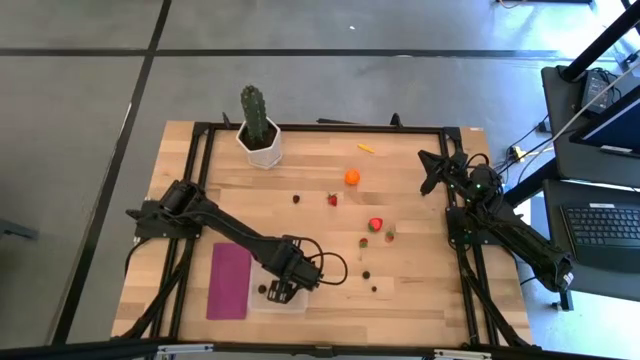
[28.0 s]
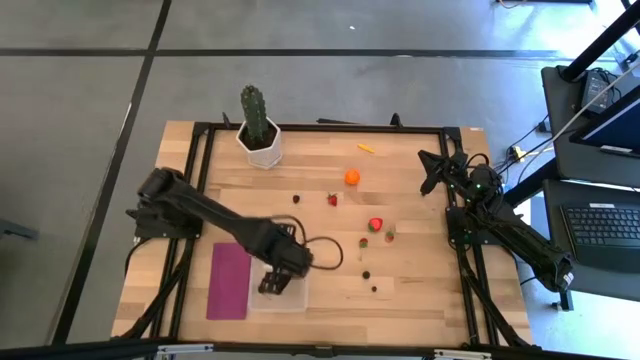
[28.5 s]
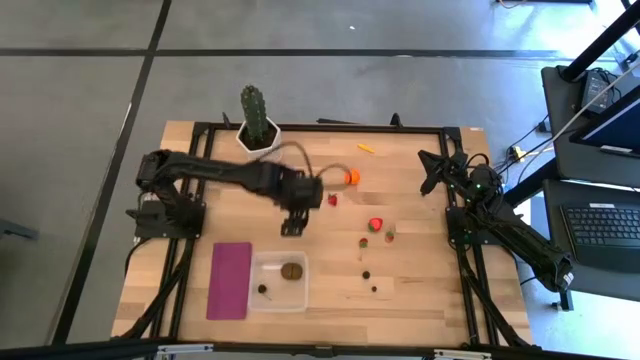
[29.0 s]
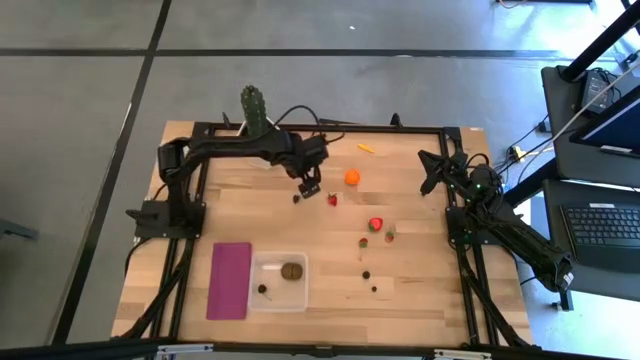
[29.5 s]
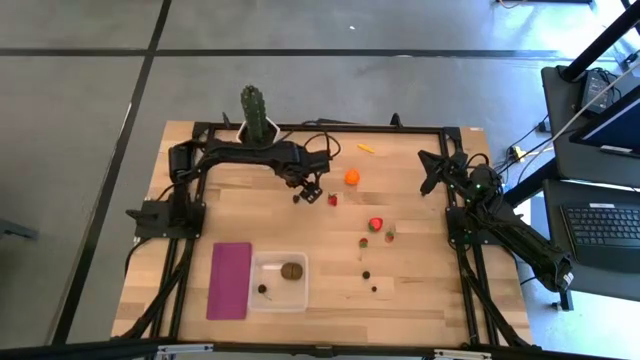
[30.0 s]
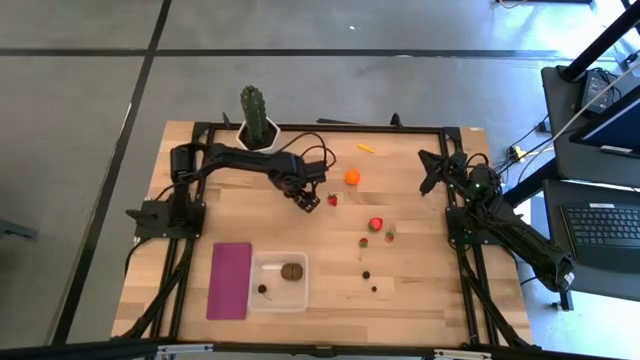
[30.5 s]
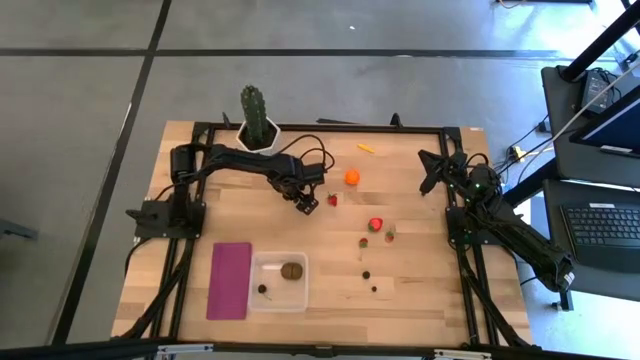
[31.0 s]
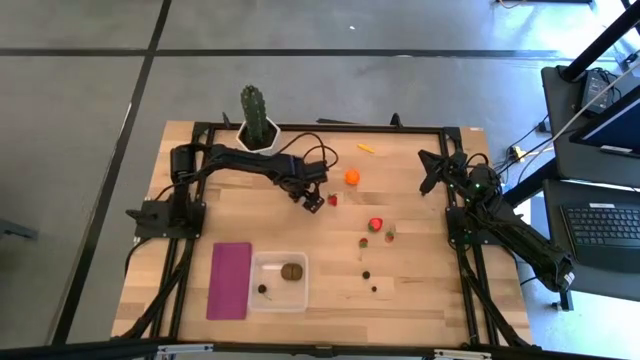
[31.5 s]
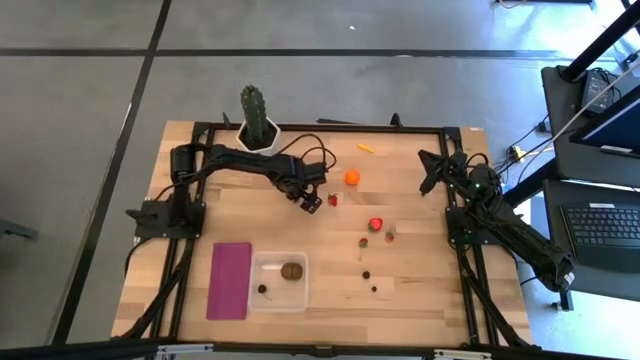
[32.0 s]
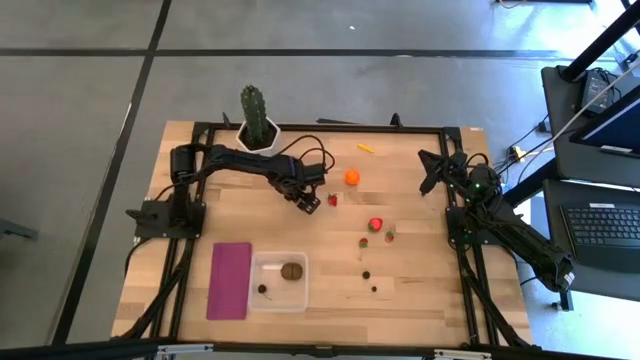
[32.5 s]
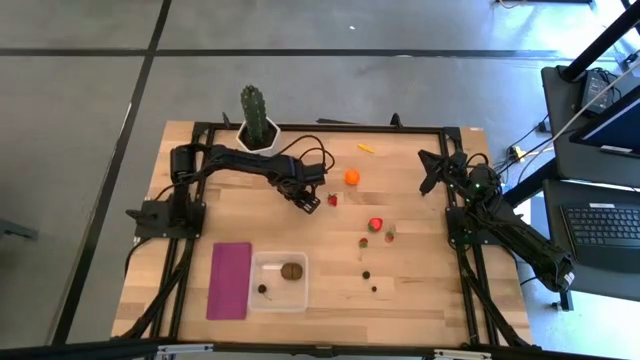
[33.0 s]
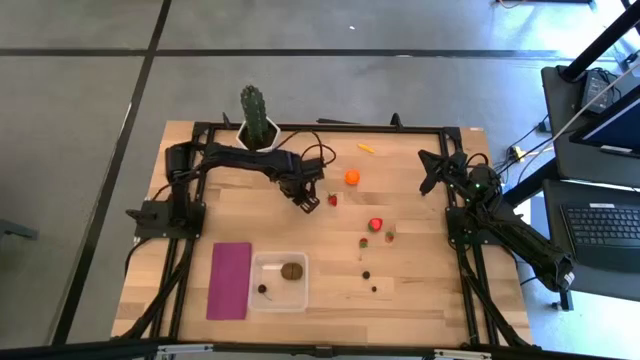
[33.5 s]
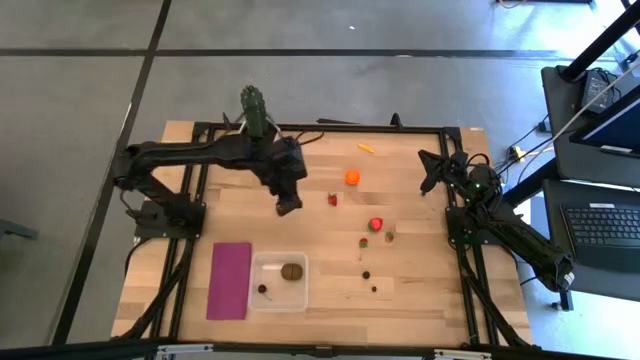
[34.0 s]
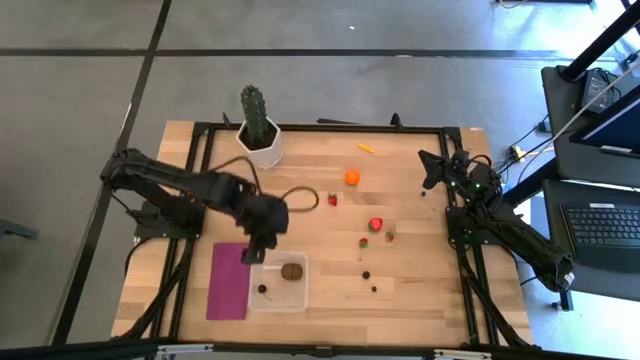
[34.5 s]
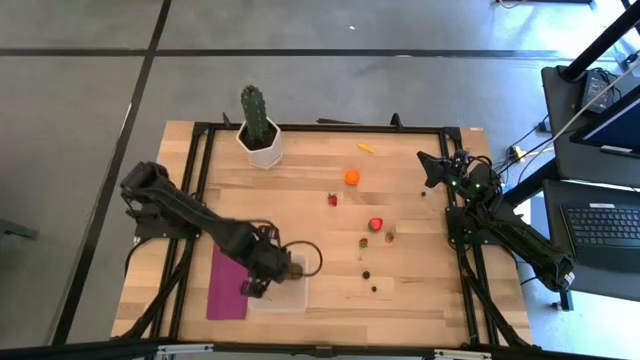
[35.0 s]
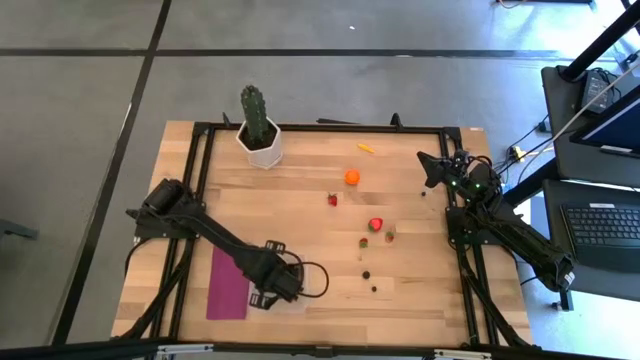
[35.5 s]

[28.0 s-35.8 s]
Task: Pick and placing Produce into tupperware
Put the blackberry into the transparent bin

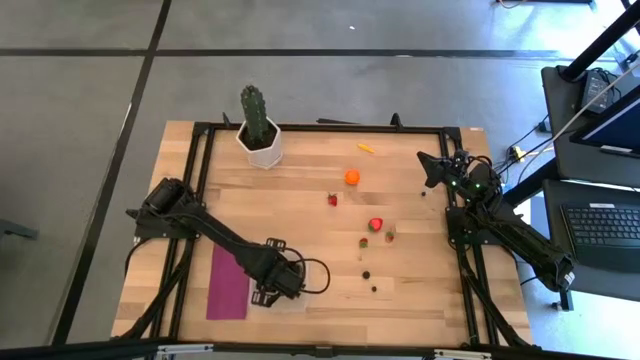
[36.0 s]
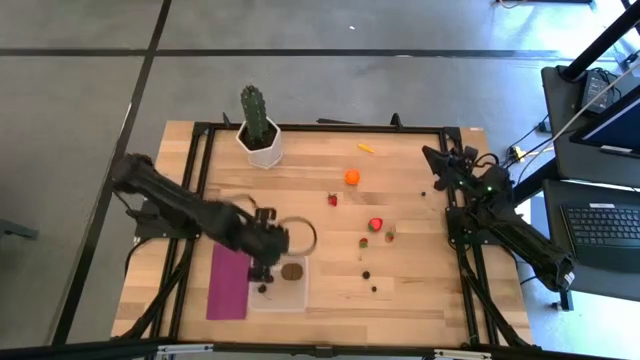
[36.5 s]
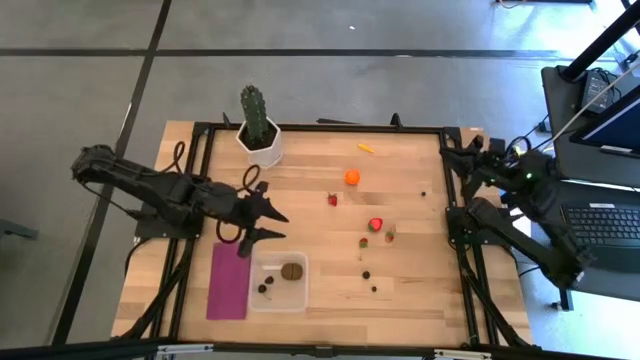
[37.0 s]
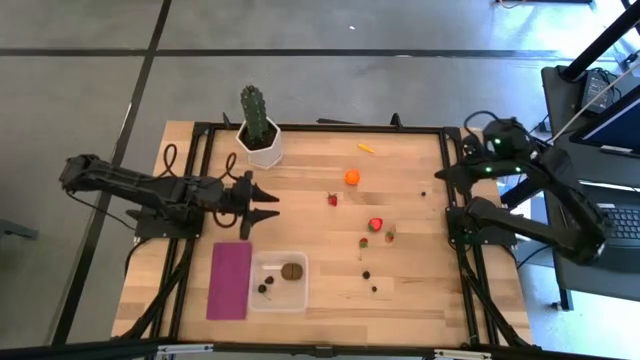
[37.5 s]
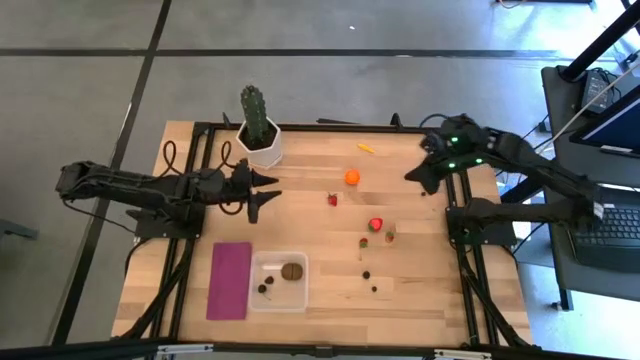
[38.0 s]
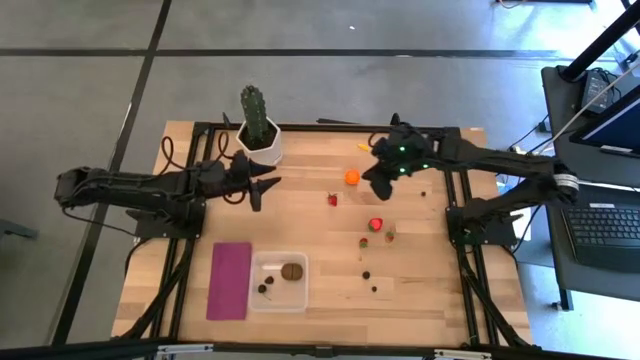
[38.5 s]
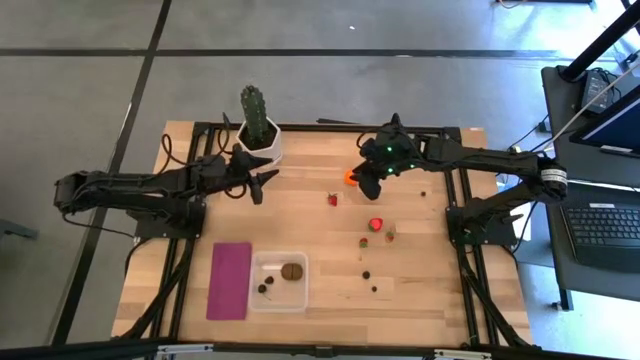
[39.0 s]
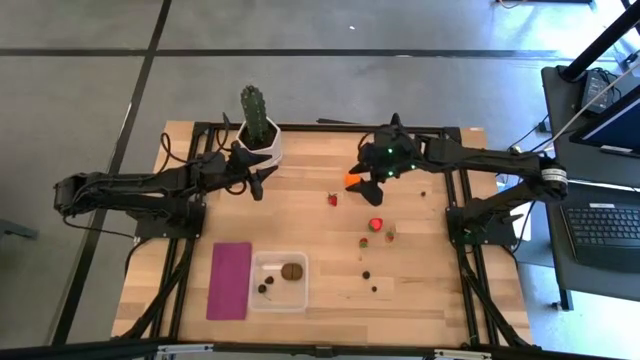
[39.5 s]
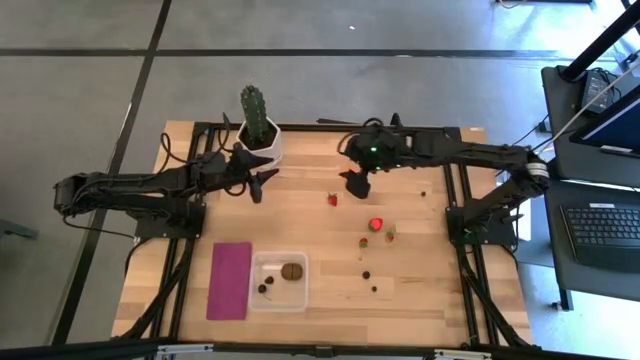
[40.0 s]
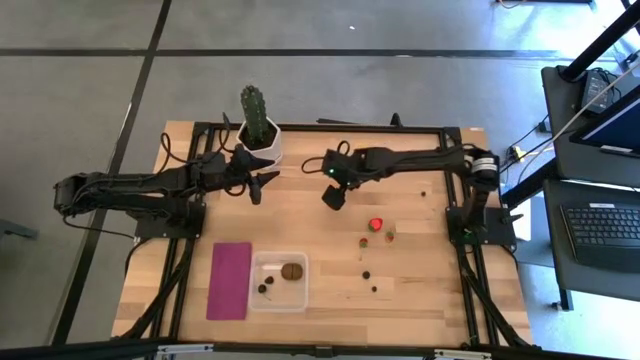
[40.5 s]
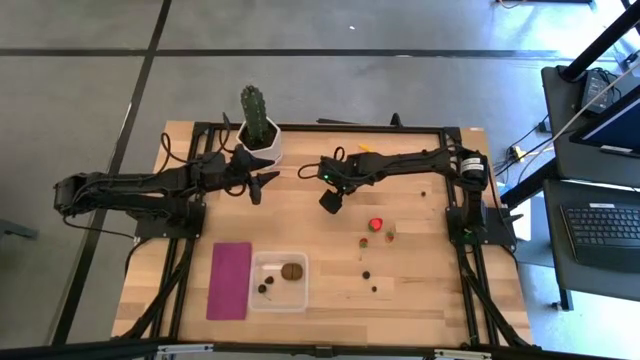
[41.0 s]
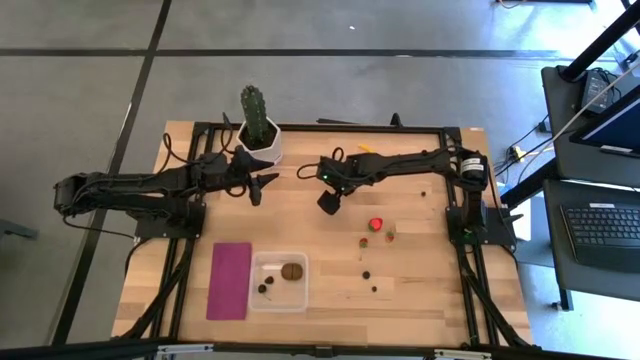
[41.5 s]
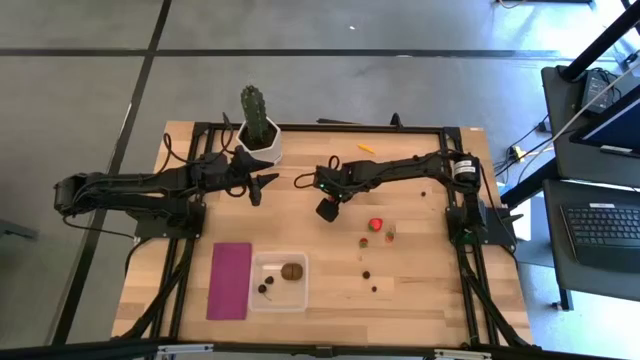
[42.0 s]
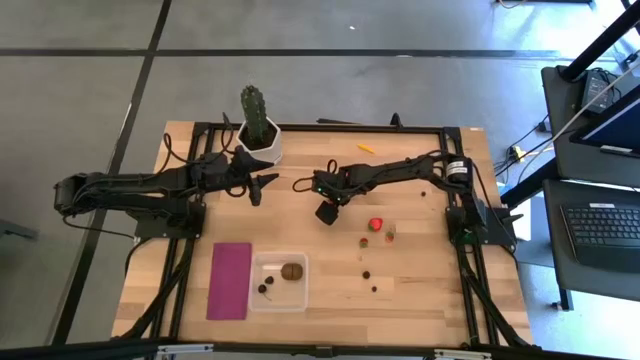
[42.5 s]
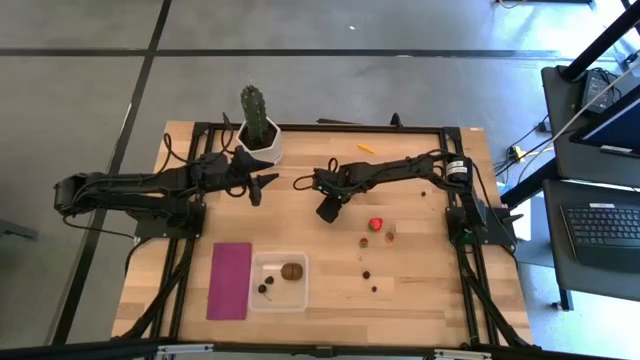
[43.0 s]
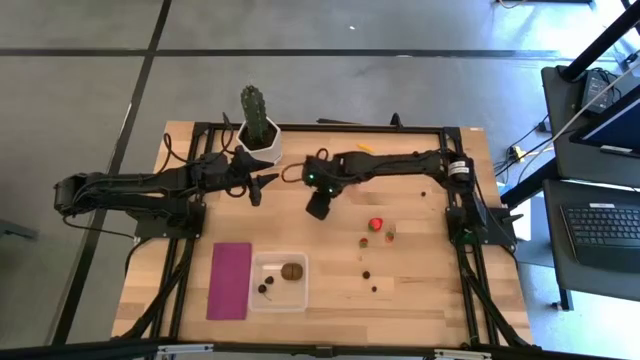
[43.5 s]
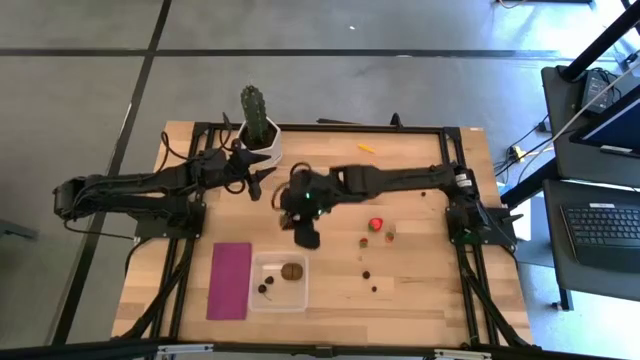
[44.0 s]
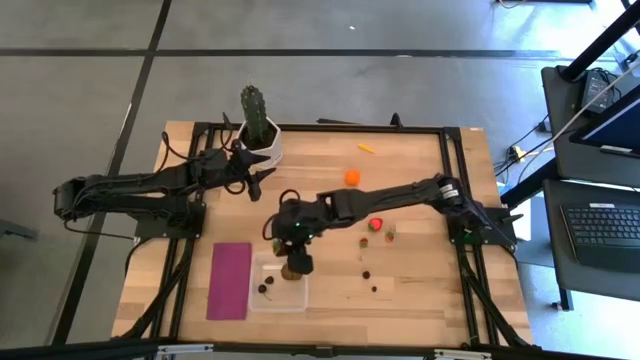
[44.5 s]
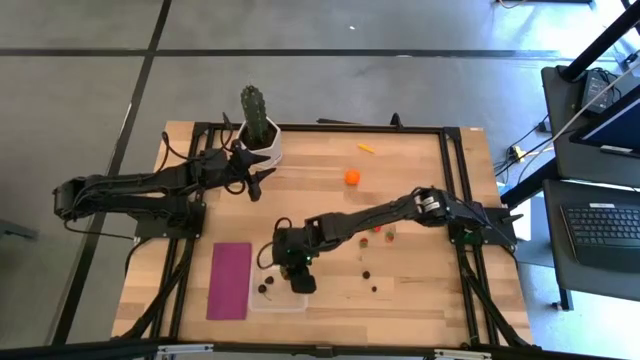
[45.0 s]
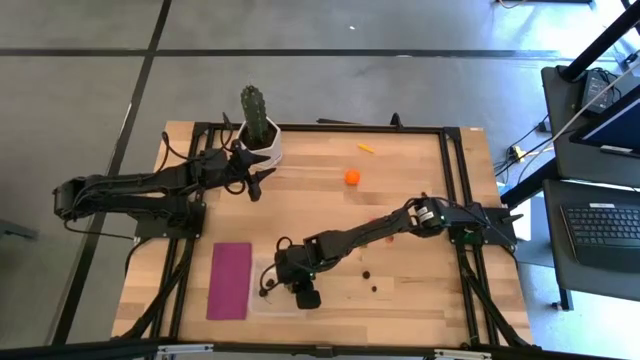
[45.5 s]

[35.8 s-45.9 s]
Put the strawberry into the transparent bin

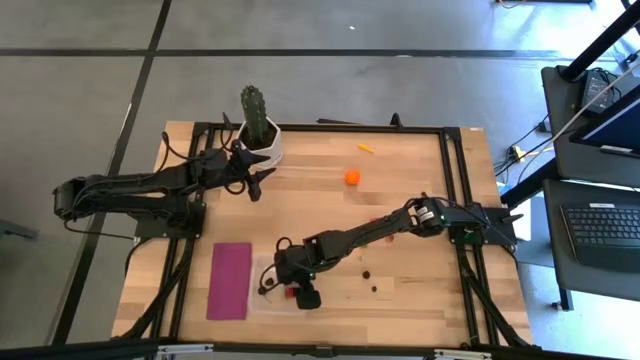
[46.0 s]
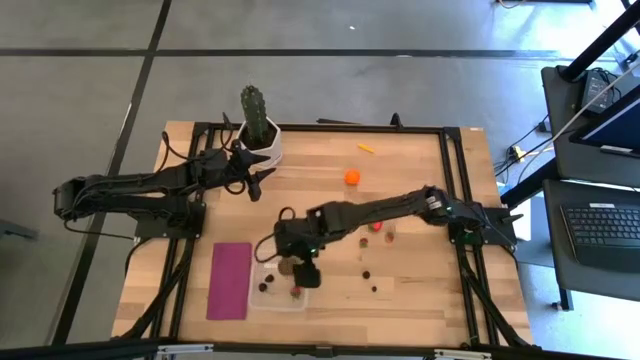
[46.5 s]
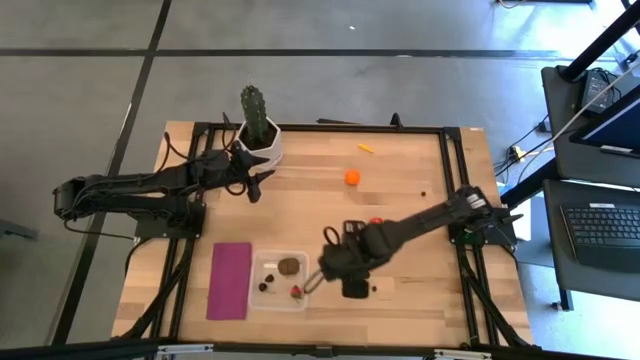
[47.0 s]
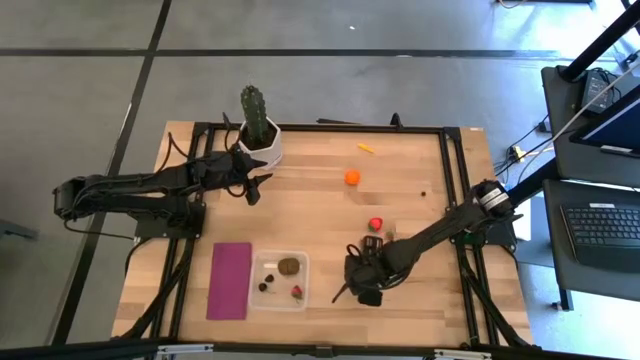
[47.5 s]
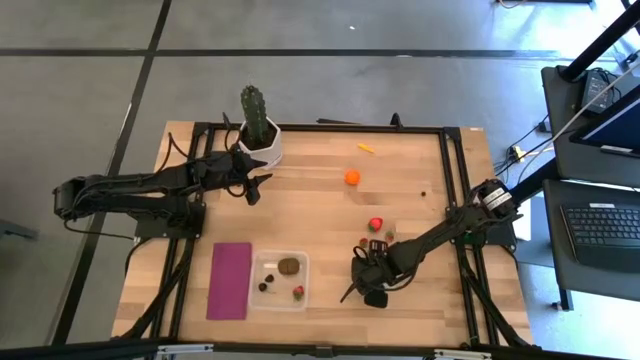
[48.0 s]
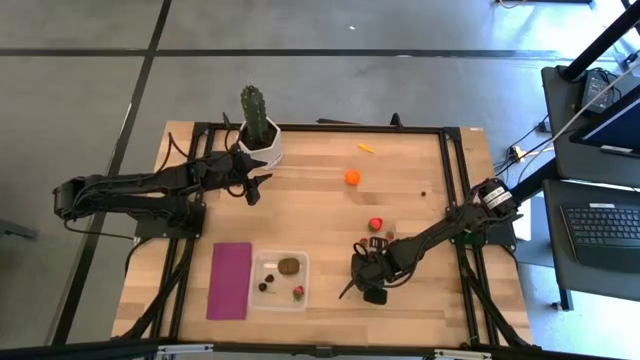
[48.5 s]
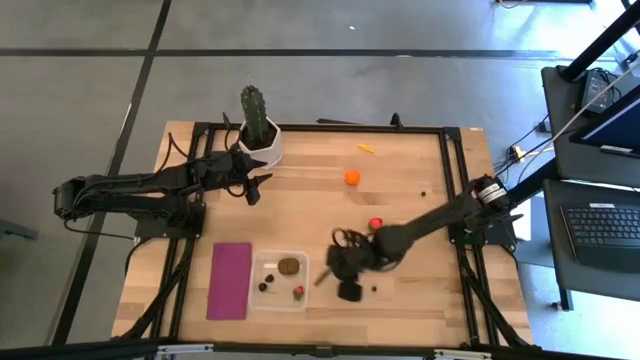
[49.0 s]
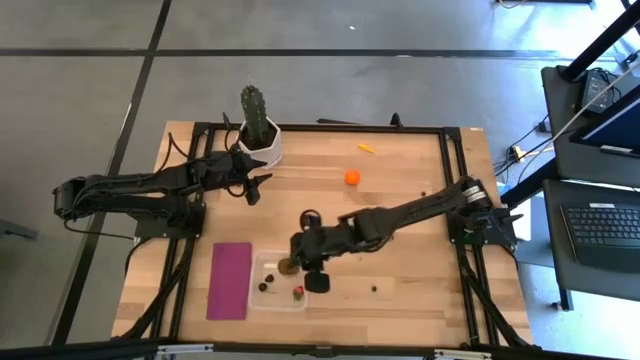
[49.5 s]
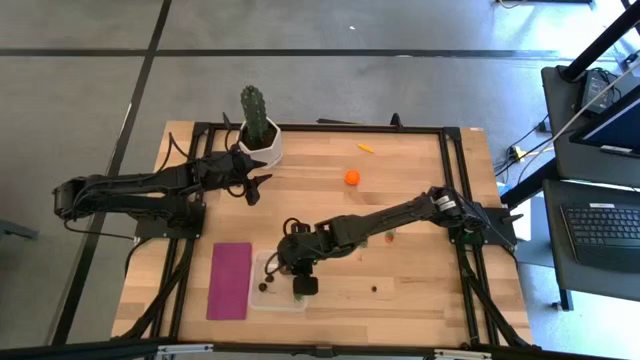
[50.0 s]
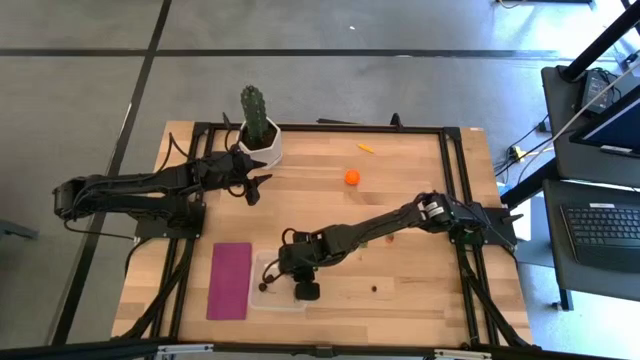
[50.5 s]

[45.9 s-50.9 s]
Put the blackberry into the transparent bin
